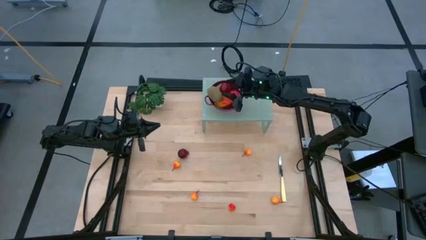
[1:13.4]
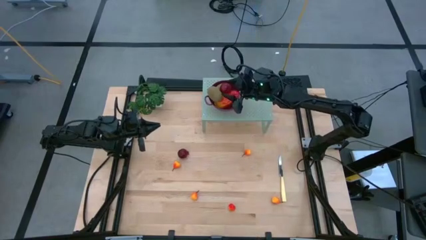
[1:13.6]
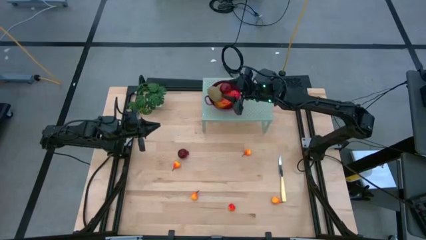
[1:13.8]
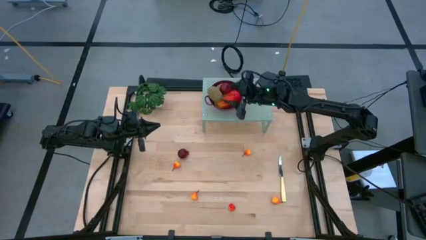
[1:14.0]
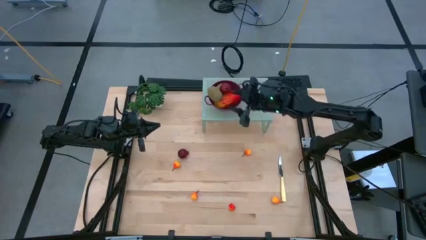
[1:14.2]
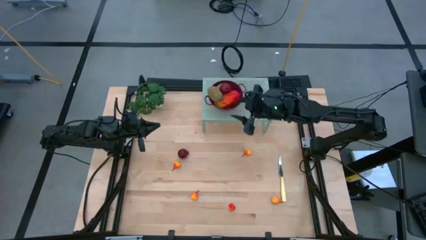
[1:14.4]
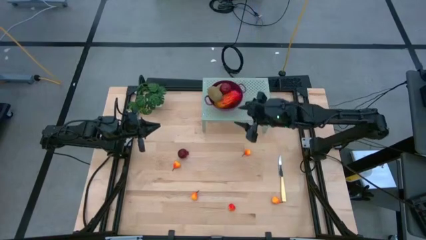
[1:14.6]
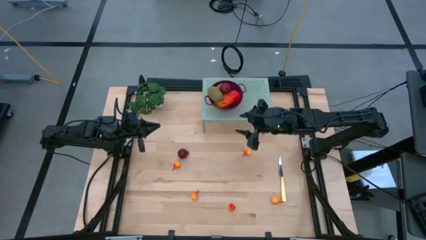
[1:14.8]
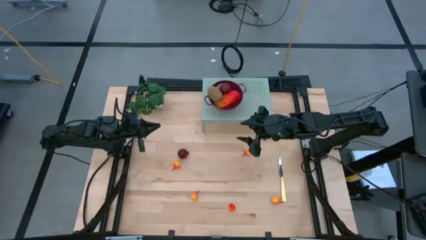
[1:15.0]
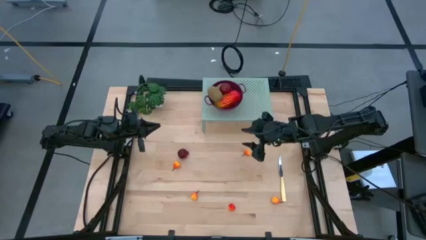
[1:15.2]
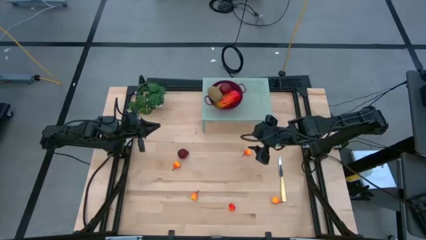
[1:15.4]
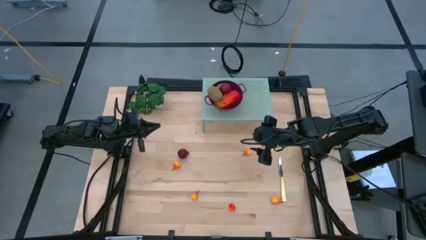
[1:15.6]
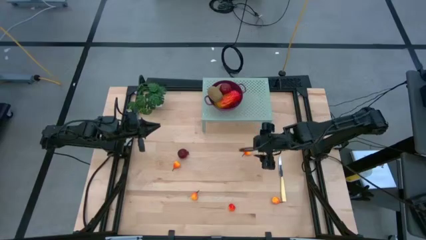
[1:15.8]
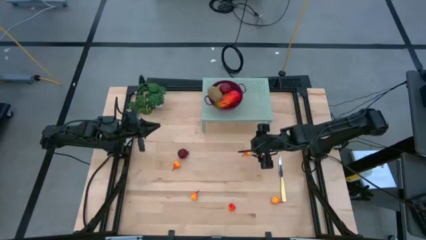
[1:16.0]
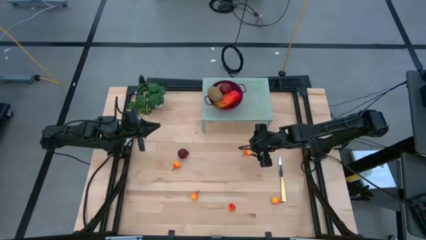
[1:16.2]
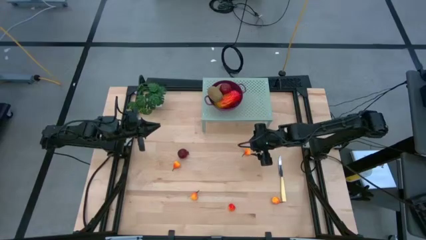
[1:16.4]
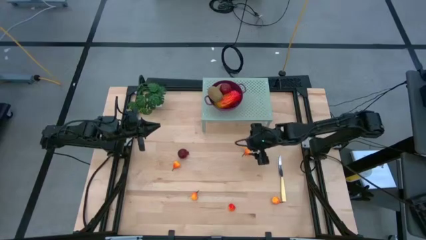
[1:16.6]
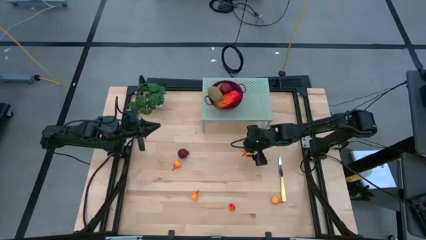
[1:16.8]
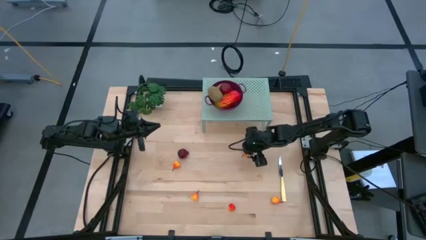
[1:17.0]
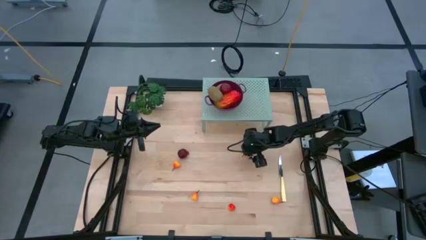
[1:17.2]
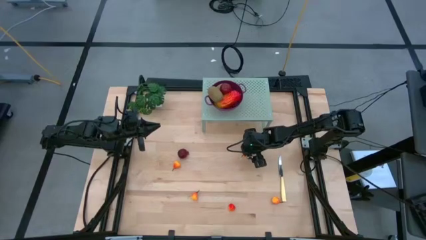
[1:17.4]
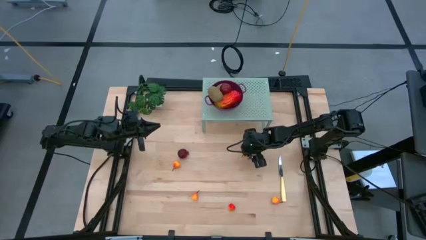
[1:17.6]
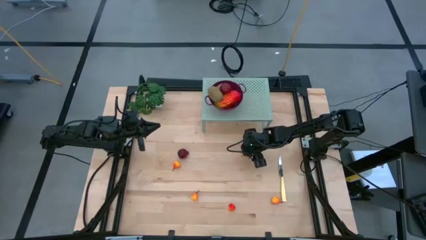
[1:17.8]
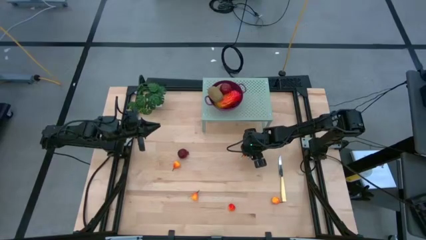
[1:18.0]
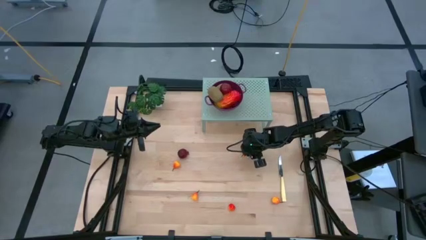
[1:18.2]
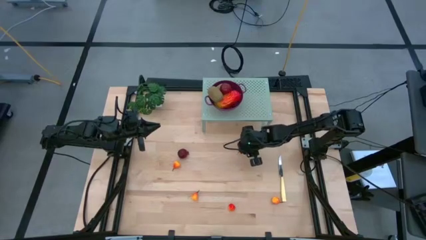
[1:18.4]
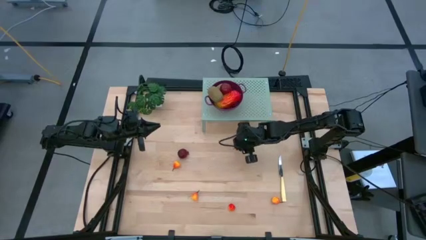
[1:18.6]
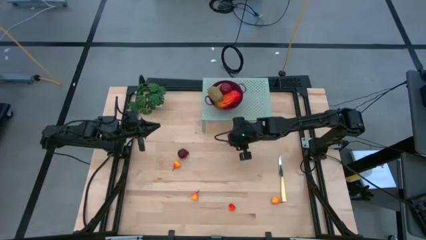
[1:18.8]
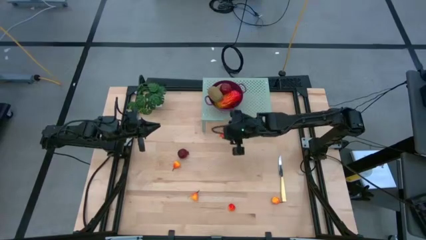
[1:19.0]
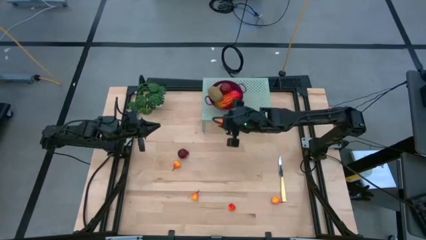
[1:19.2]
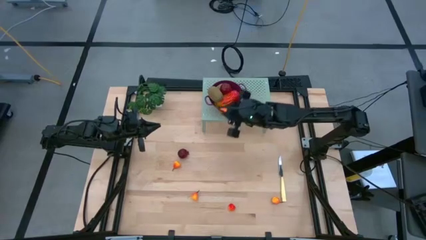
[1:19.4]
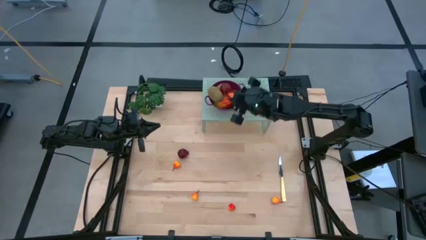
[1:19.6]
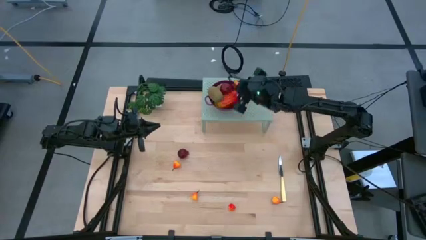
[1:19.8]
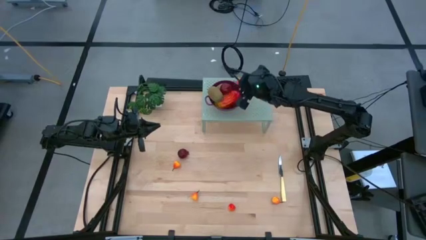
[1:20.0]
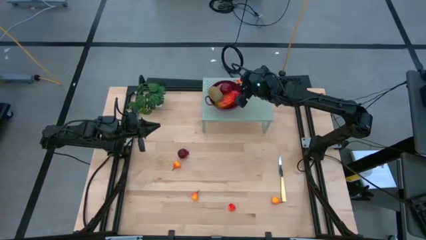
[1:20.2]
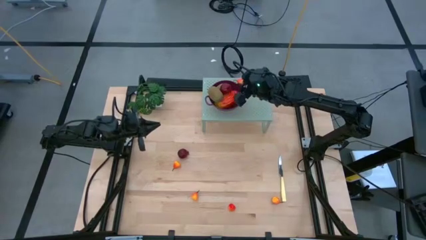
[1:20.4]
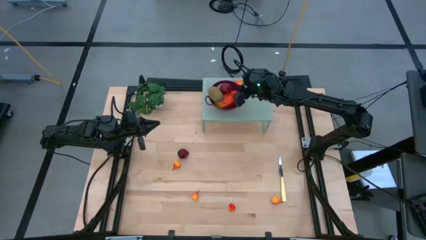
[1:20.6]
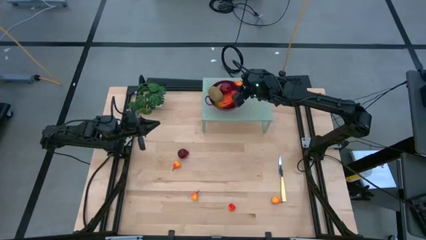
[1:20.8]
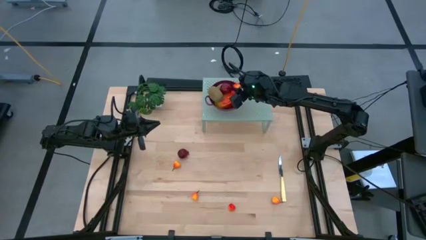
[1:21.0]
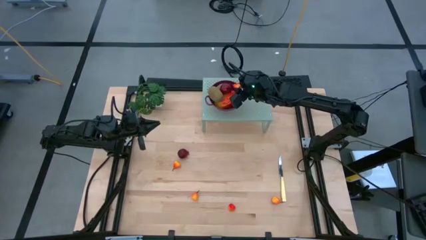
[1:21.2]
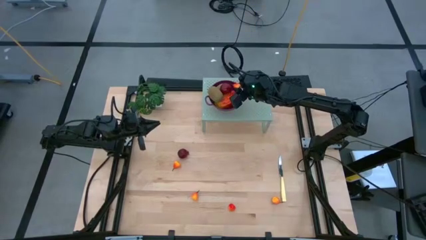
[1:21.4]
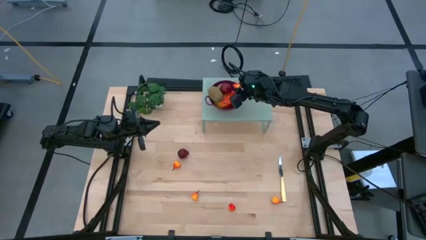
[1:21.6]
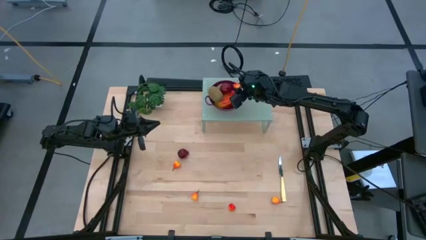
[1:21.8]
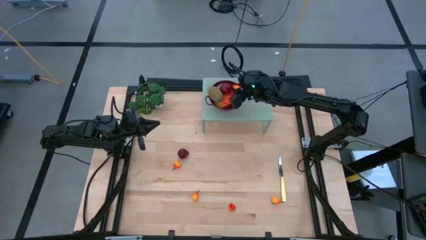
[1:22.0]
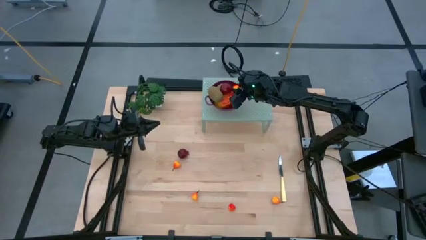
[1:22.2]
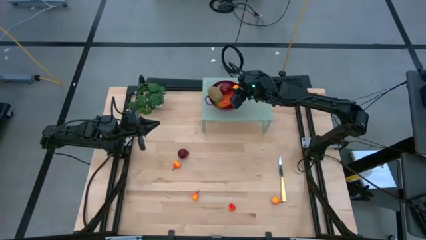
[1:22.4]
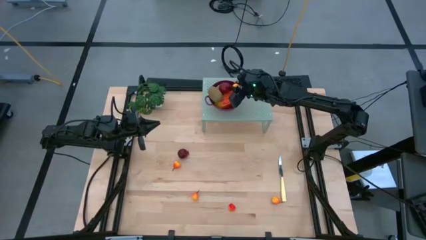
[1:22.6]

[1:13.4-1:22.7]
Task: Pick & Place Fruit
Put the pear in the violet strainer bowl on the shelf

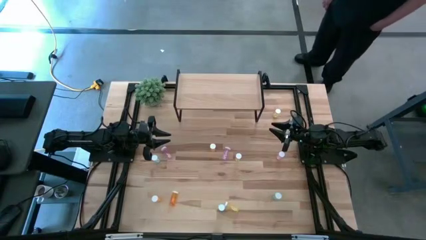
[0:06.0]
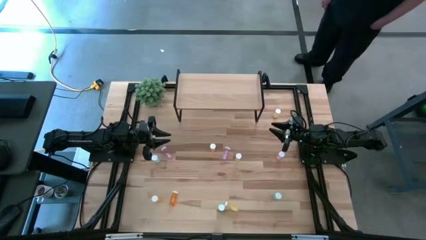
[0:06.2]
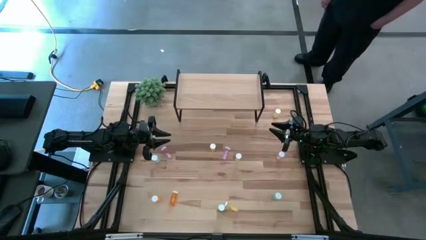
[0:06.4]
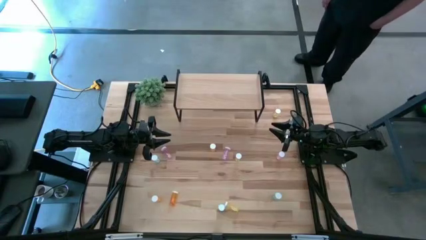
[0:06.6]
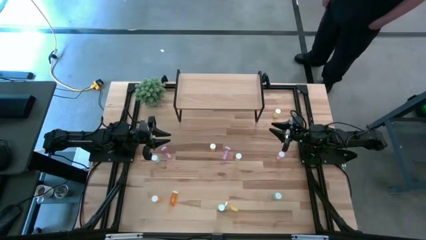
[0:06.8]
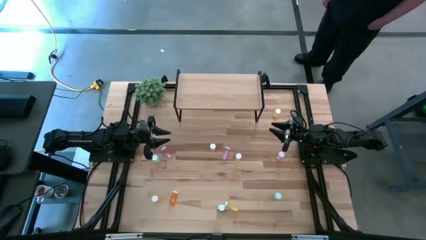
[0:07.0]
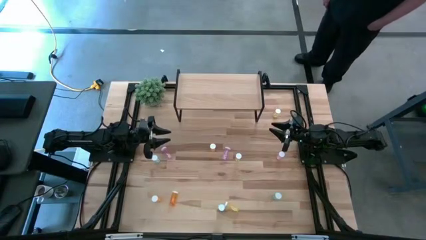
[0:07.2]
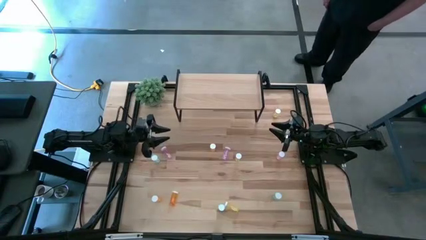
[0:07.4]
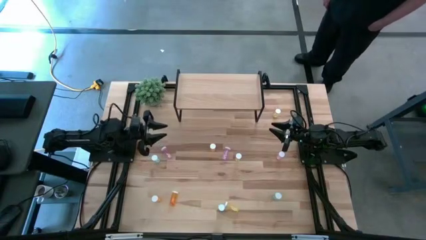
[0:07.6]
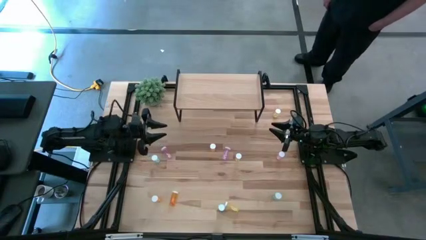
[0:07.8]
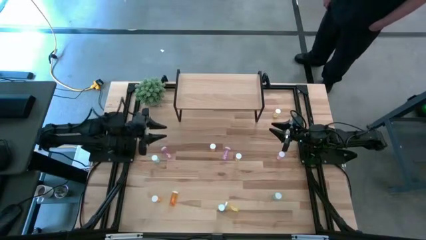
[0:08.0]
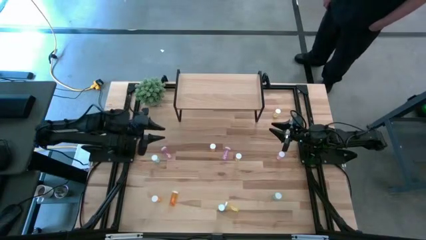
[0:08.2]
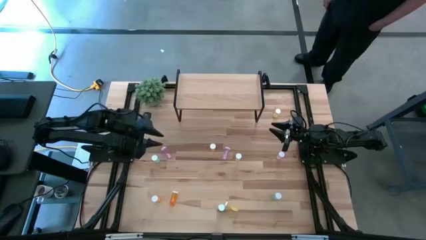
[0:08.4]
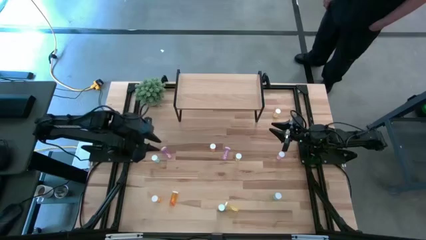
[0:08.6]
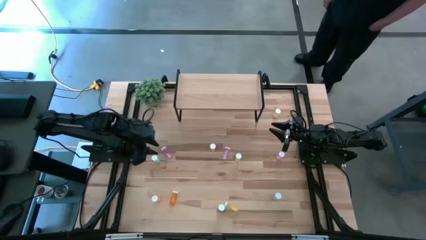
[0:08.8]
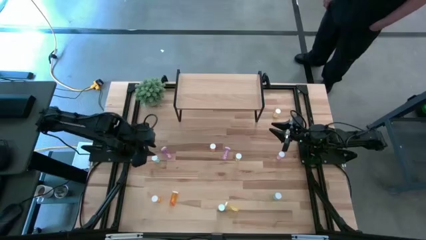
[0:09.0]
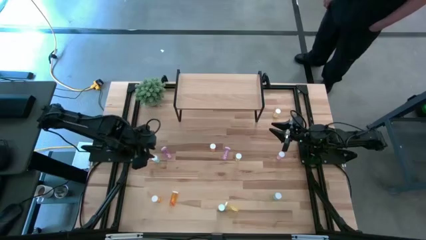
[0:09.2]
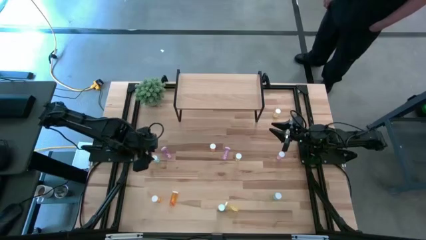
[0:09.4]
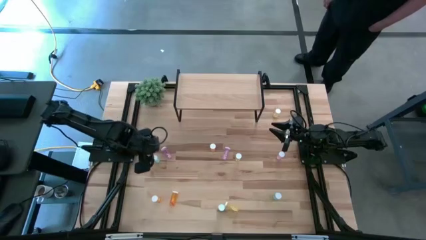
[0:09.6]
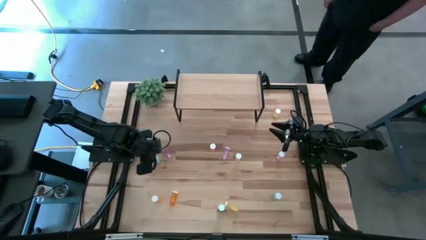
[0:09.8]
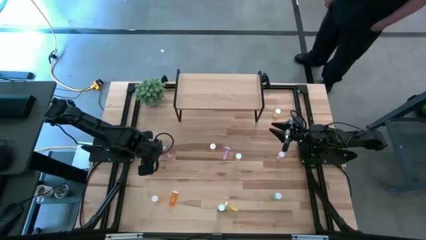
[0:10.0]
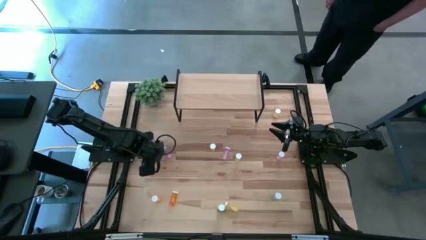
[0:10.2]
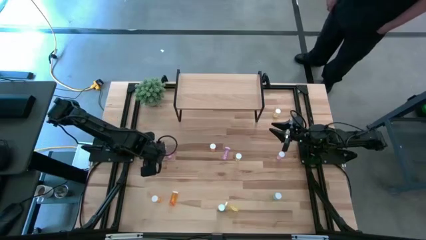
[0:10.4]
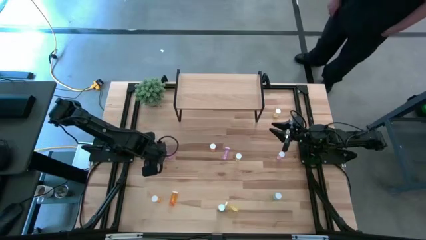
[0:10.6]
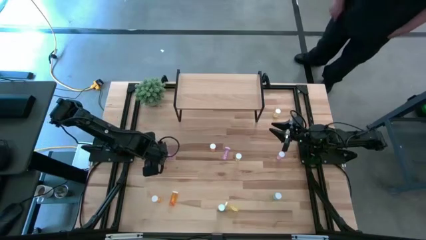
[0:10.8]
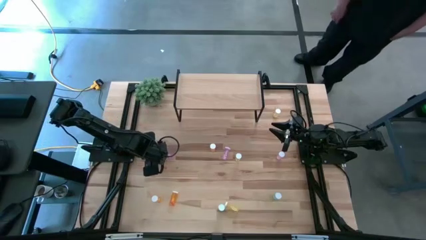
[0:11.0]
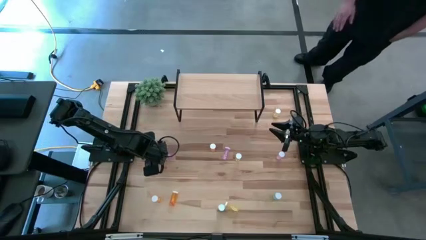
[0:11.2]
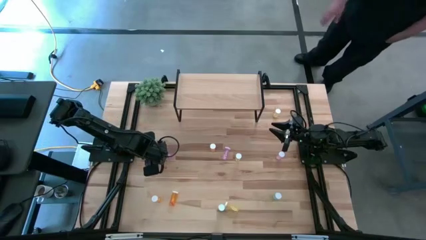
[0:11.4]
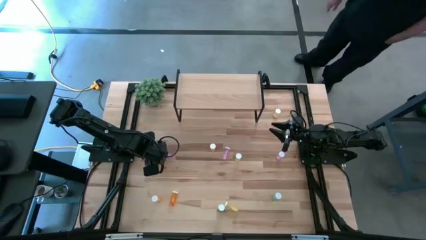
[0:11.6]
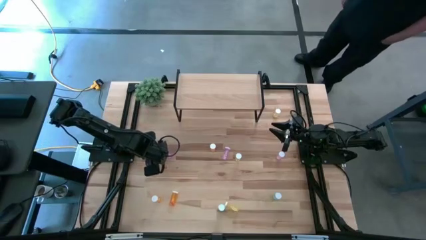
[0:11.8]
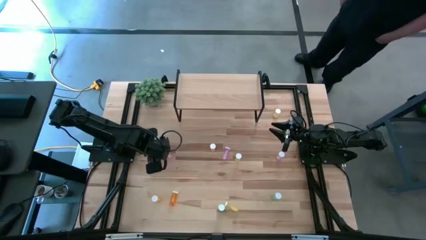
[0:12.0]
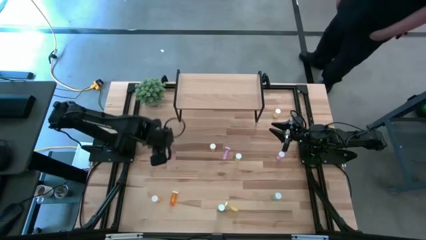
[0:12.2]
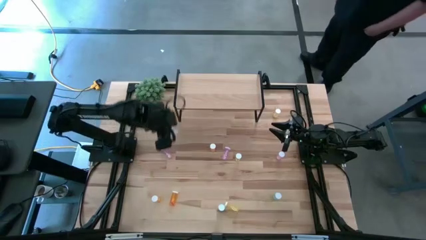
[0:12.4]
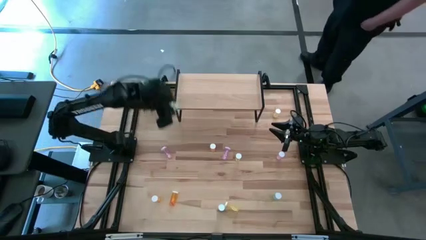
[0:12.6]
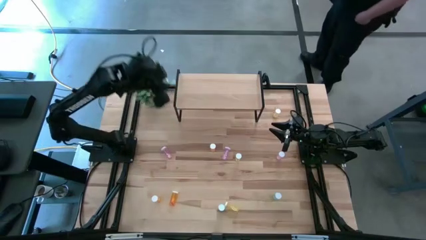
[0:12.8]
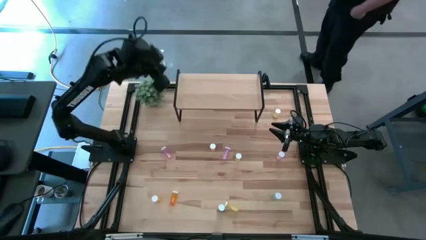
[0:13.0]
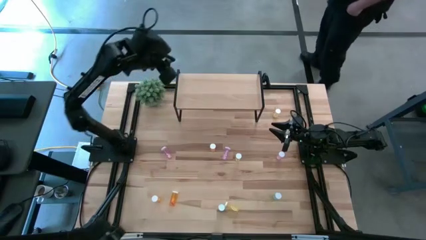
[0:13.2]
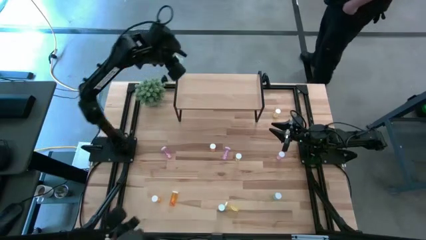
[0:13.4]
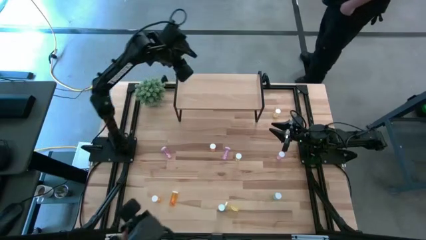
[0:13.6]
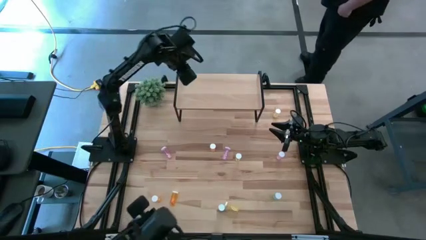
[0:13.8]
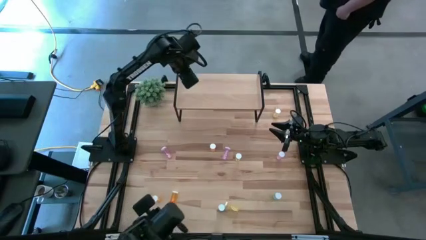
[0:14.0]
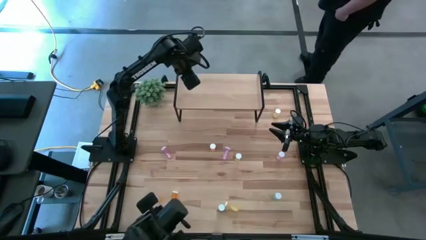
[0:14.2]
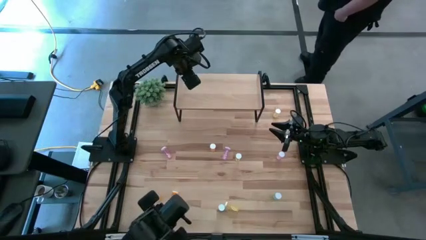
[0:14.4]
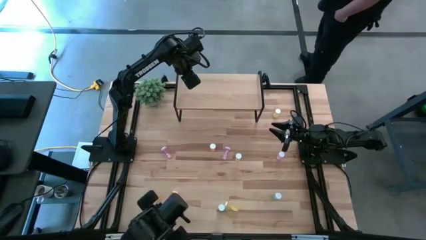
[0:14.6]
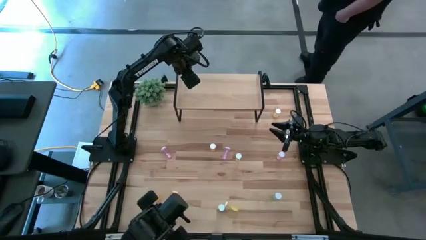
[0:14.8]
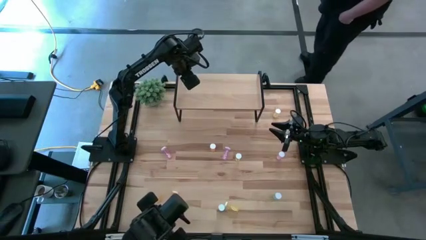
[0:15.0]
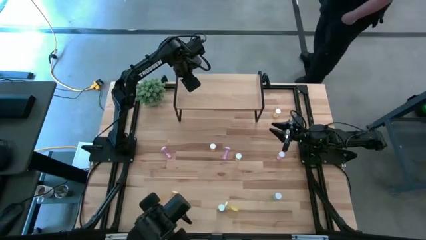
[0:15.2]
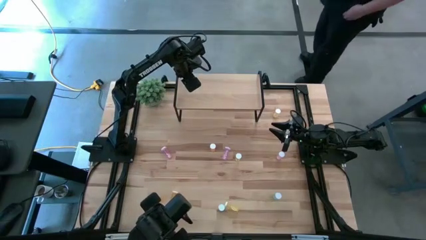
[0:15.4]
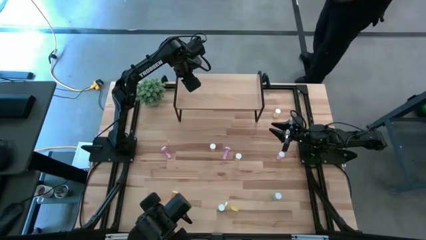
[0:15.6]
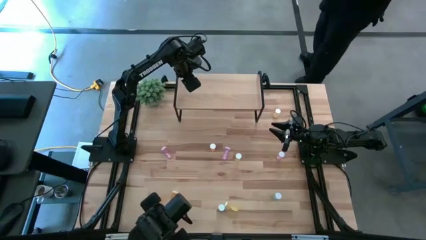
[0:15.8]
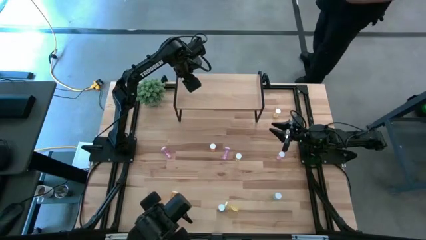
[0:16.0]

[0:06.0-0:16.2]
Task: Pick and place medicine bottles onto shelf by color
Put the top blue pill bottle on the shelf
